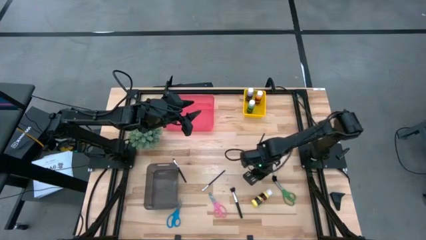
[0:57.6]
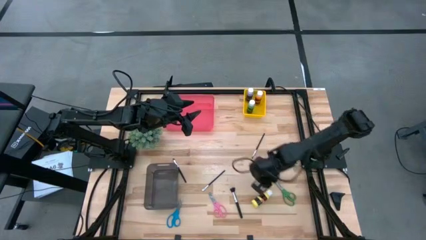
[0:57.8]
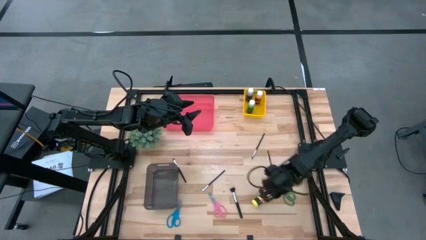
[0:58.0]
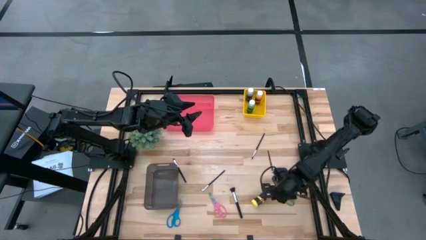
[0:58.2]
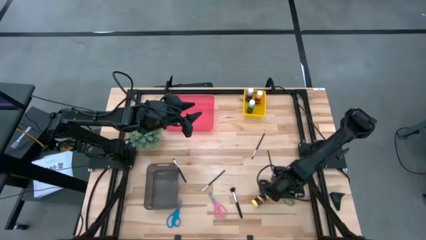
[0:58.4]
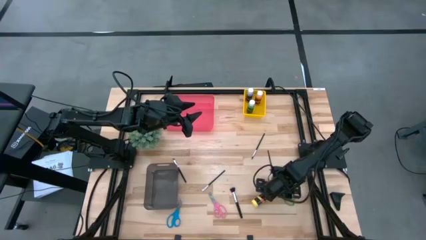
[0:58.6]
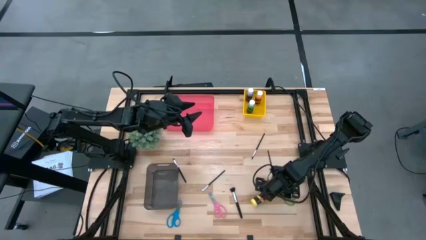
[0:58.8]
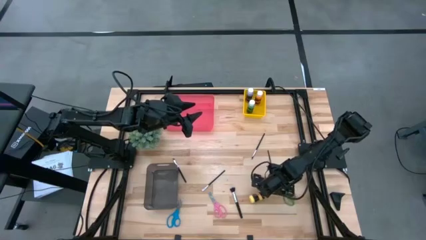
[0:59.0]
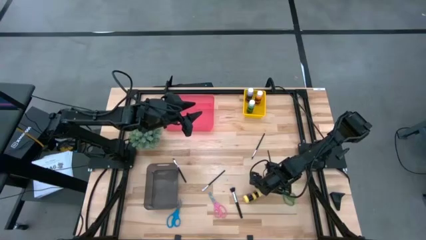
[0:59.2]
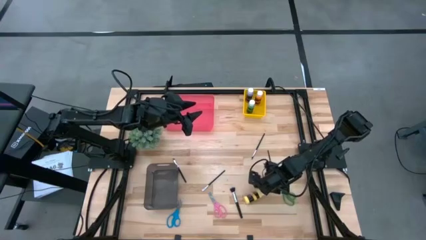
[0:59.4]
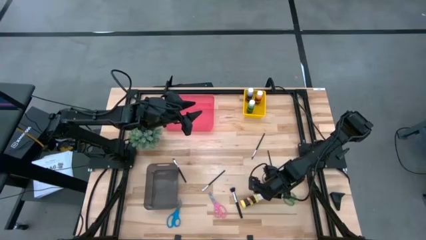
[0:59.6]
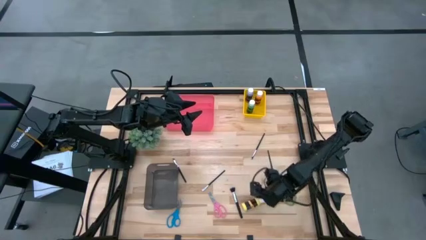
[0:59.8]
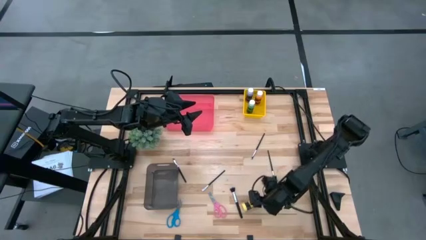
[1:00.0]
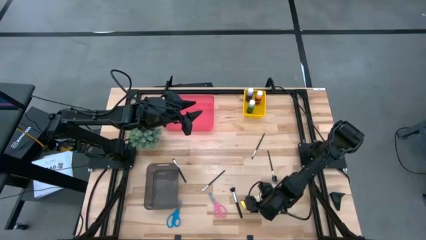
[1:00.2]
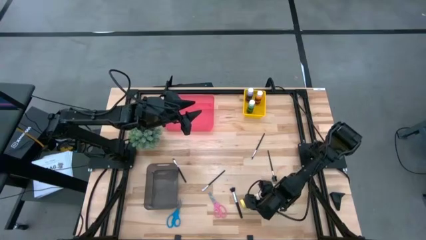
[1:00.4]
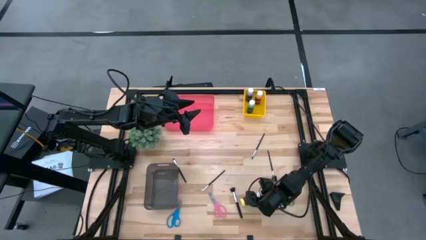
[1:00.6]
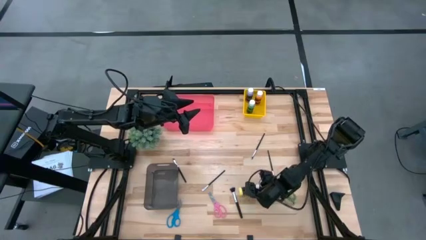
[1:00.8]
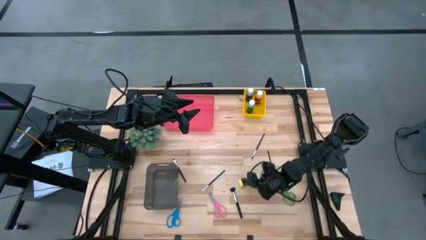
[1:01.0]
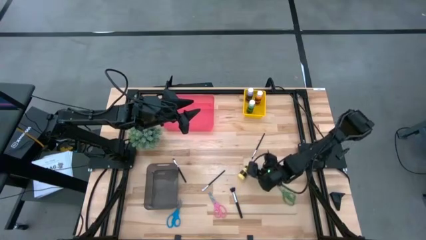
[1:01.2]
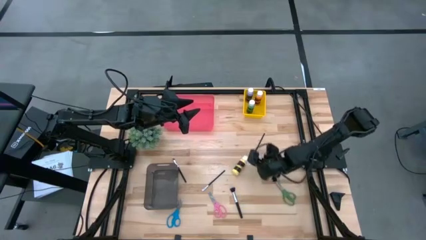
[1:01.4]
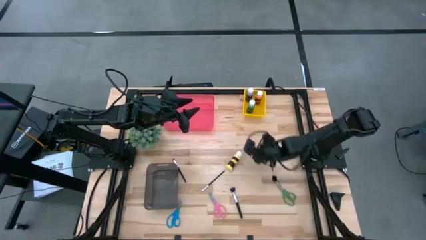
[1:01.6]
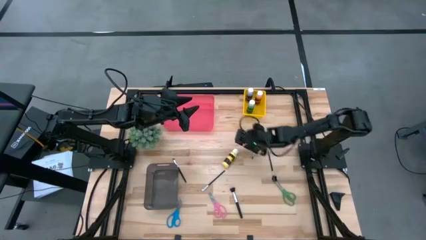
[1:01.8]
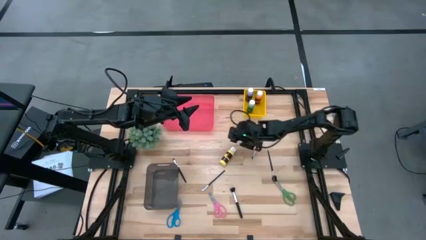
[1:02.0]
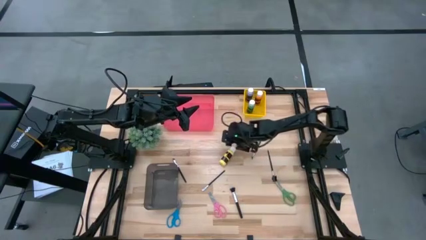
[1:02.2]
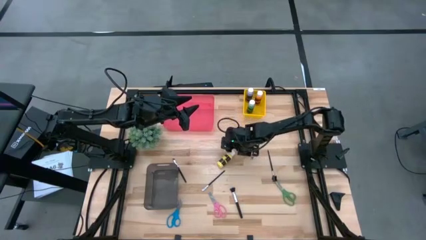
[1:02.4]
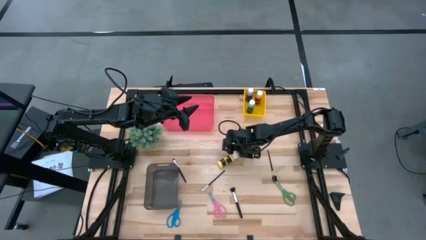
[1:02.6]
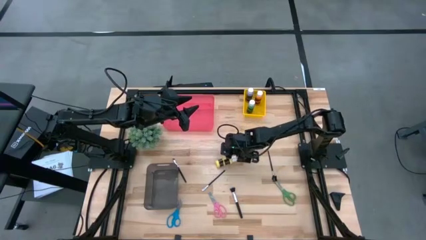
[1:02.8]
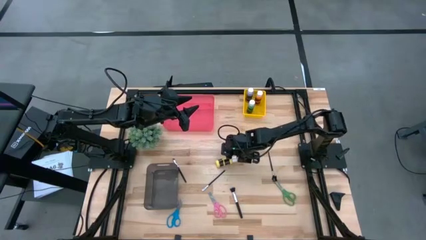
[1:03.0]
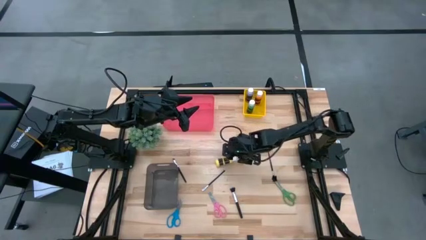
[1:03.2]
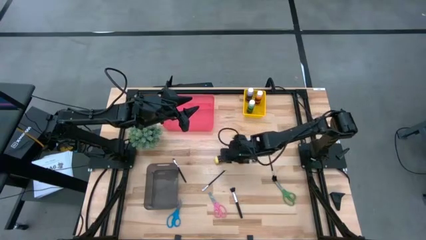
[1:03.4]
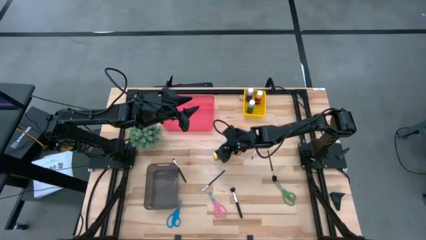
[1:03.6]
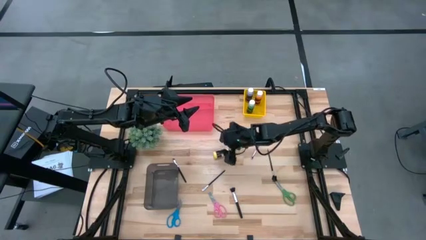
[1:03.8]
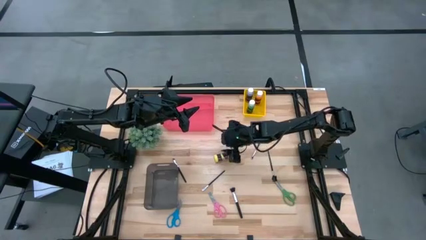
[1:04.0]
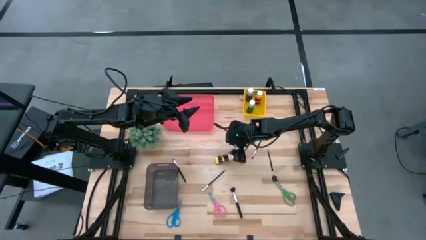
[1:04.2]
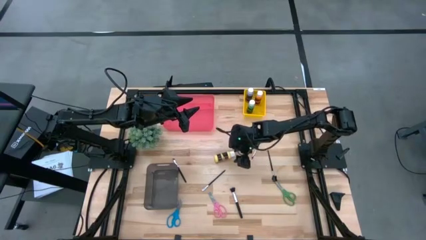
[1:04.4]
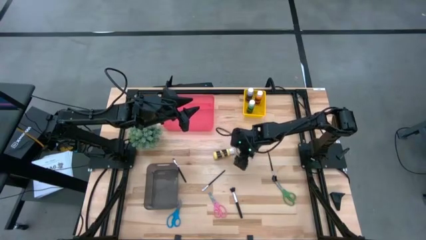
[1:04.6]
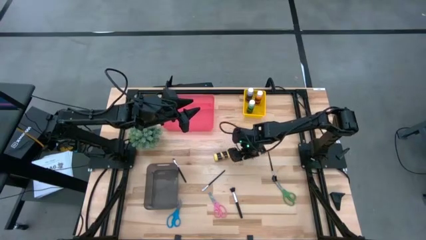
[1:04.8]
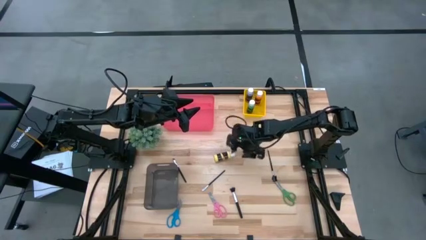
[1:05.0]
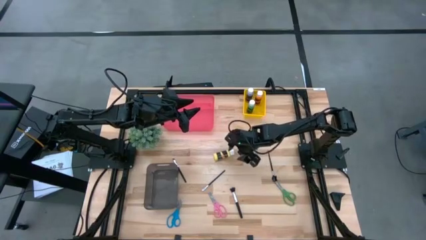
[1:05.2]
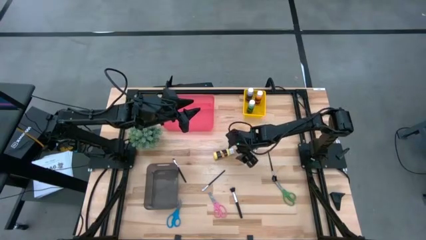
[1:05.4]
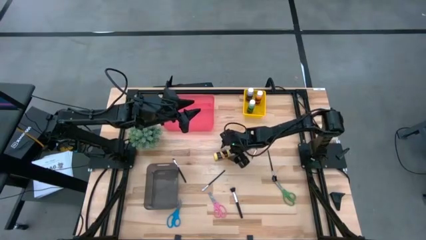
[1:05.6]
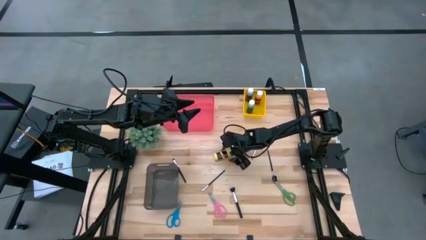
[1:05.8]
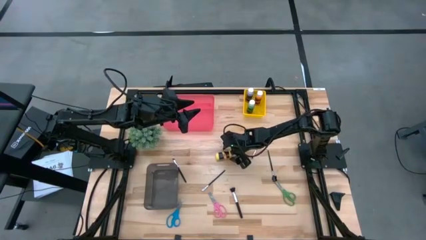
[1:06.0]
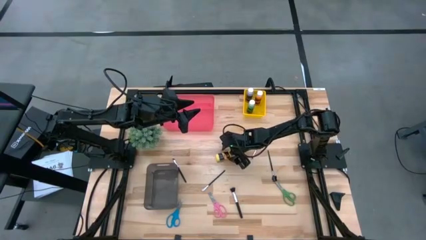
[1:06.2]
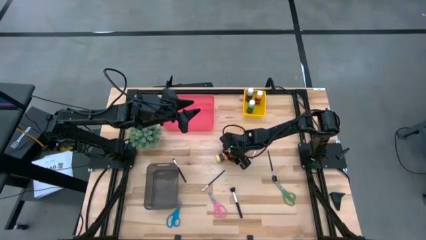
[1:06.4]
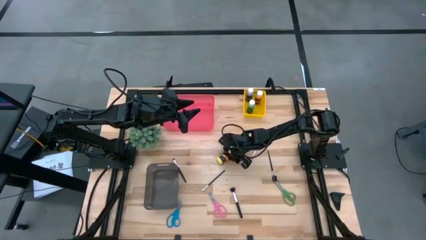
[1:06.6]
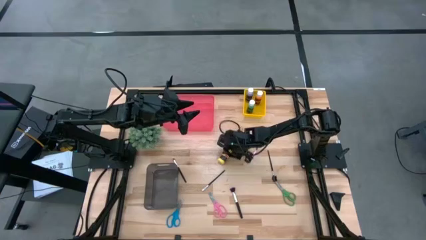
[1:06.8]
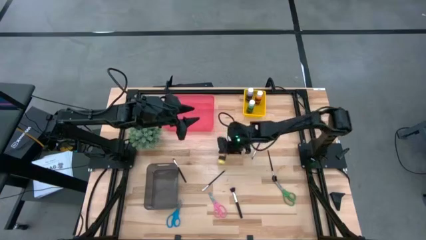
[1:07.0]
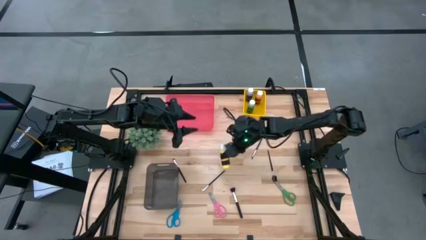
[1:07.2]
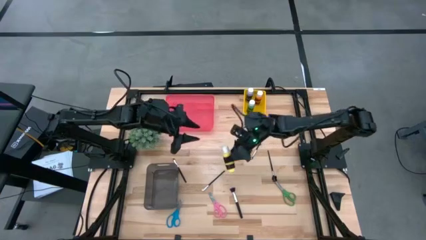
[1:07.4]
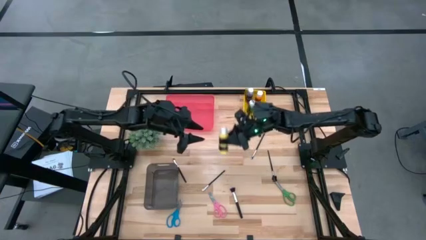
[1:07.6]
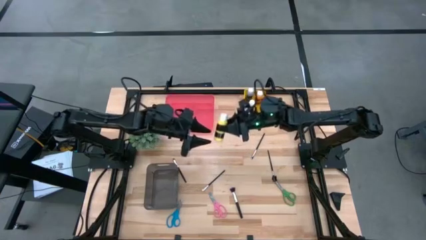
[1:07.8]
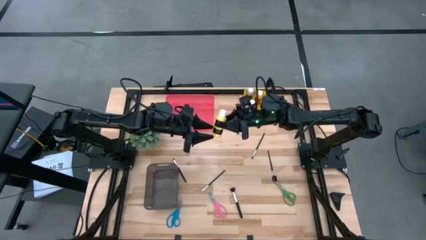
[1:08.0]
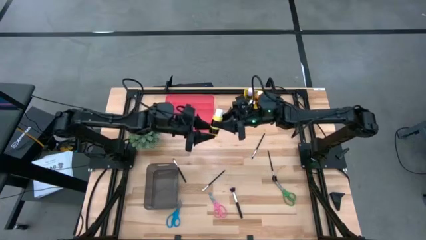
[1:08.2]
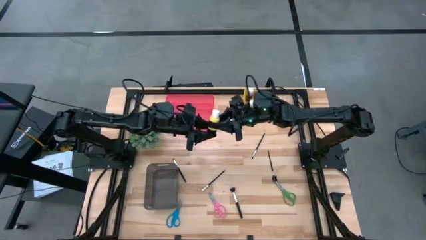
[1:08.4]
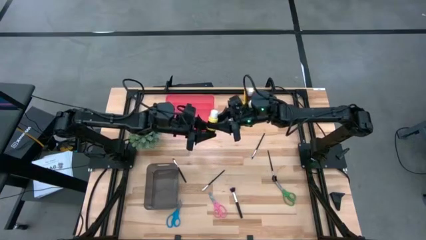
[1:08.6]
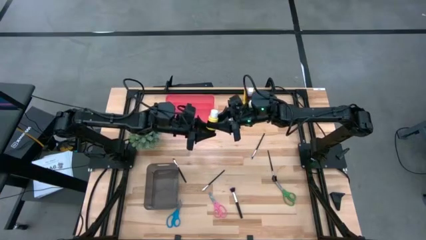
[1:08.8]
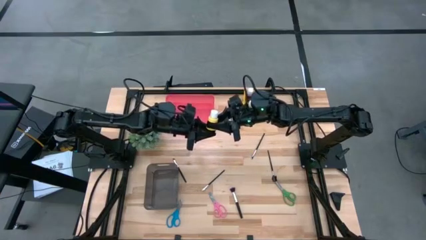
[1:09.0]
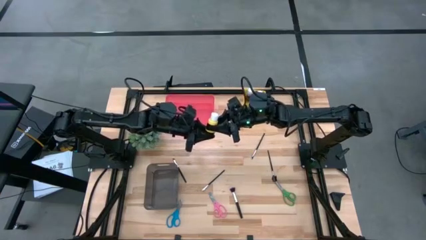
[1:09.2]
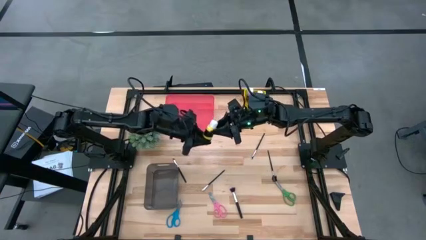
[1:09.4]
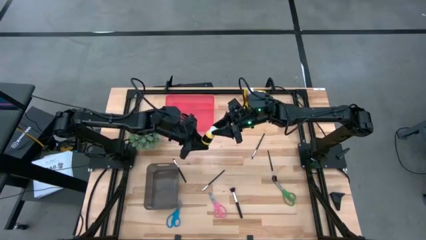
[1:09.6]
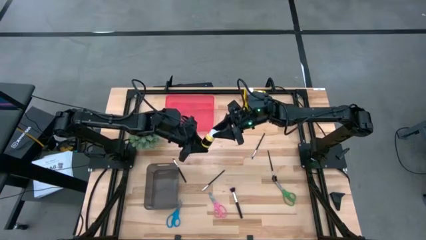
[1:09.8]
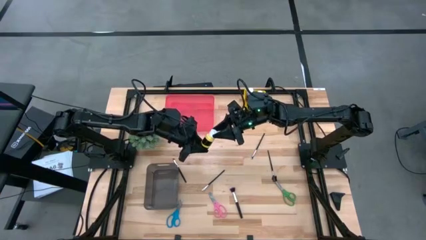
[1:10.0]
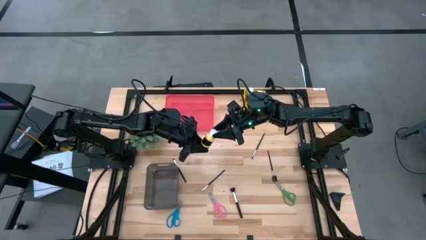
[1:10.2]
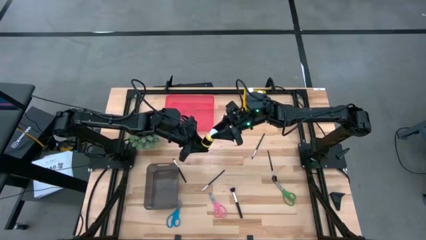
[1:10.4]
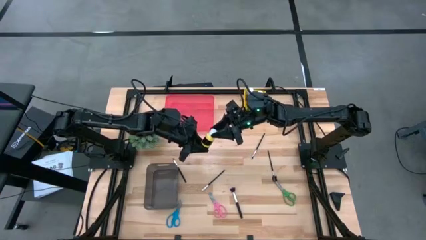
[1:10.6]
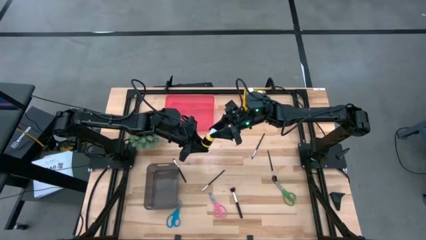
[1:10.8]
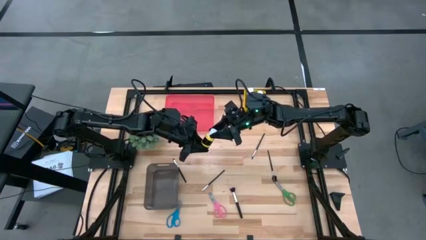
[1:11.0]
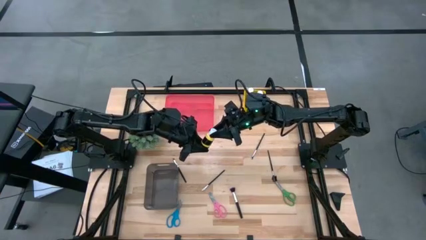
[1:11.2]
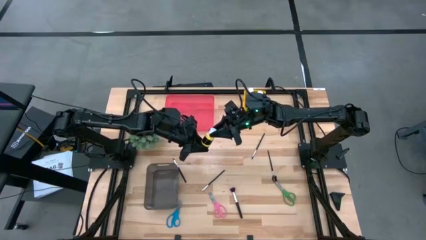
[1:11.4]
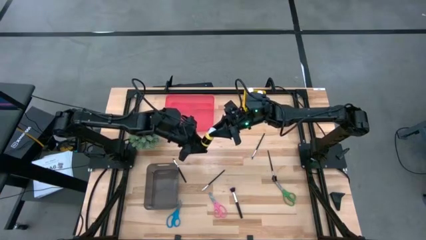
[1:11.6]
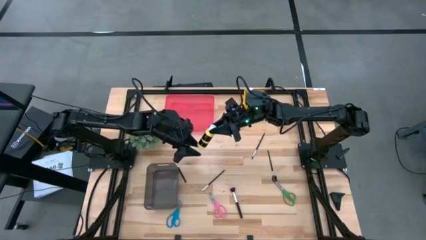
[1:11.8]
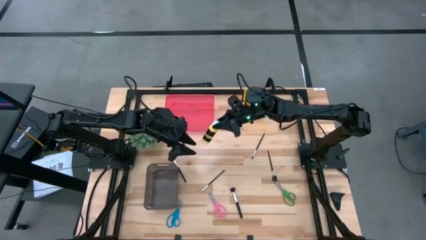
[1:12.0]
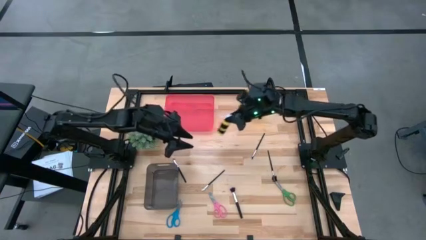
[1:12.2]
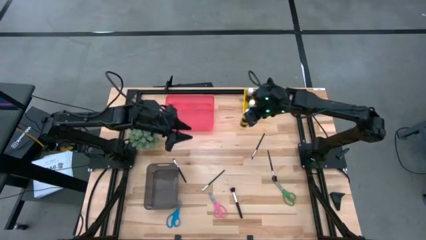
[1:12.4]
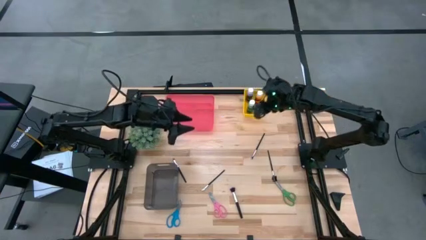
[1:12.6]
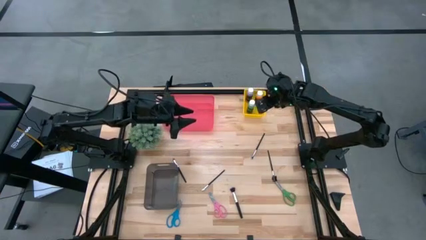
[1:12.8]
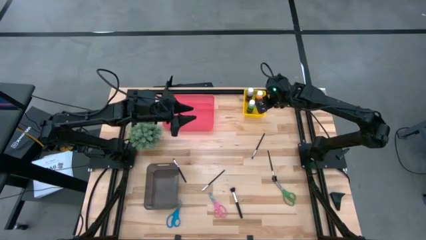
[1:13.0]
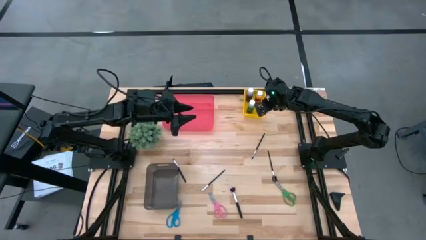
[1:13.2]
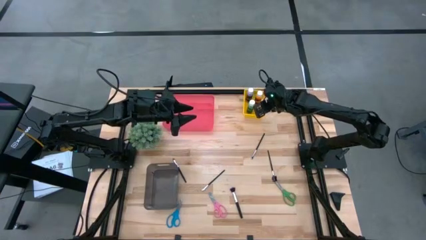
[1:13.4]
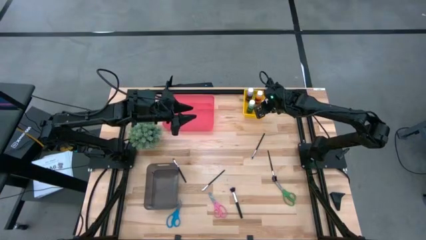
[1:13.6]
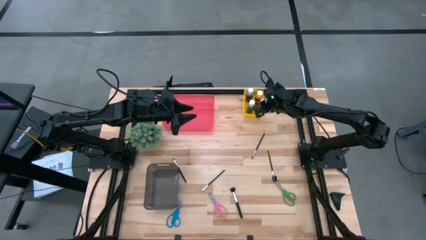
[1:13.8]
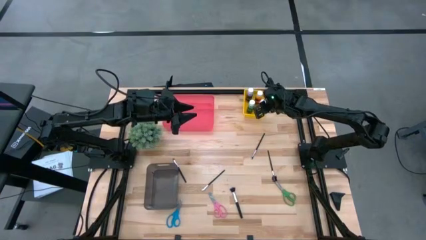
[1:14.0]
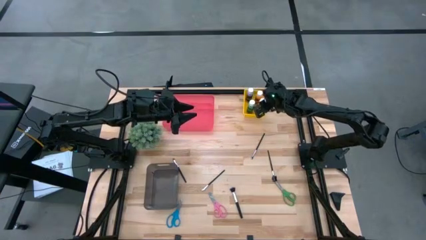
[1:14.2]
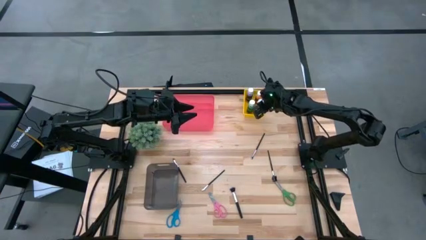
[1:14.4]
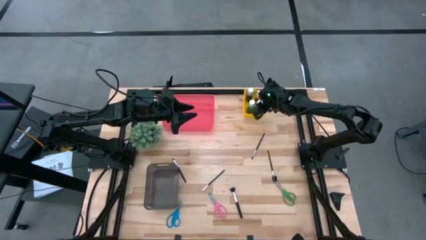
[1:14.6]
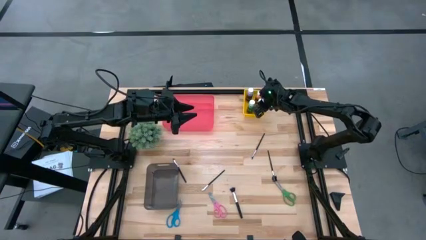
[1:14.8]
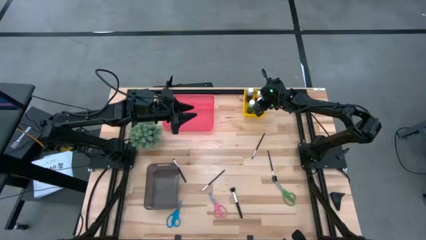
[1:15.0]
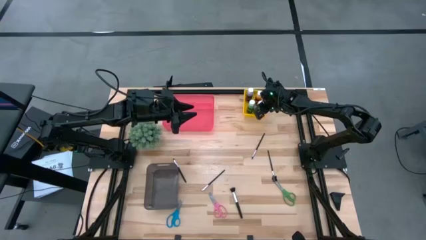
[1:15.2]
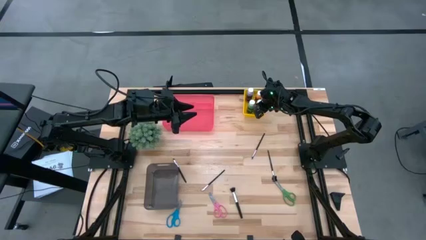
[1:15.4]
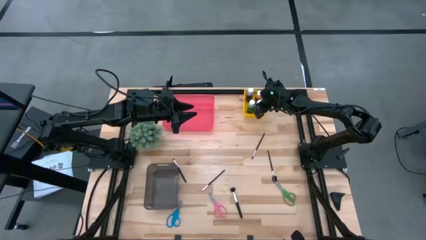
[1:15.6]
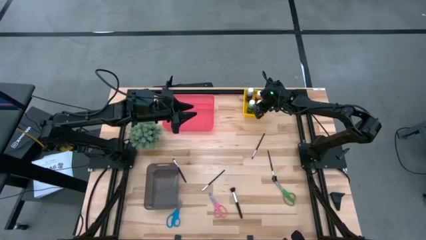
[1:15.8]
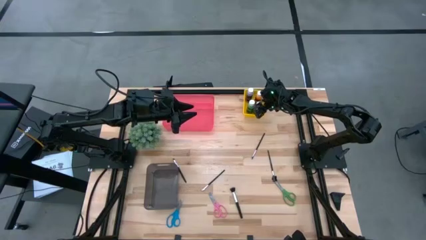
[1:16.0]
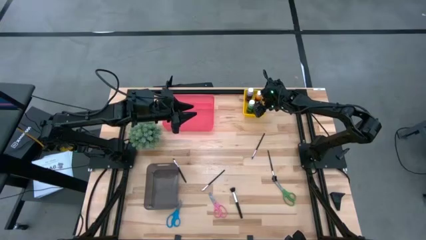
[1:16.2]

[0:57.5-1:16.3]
Task: Pick & Place Paint Supplies
Put the yellow paint bottle into the yellow bin
